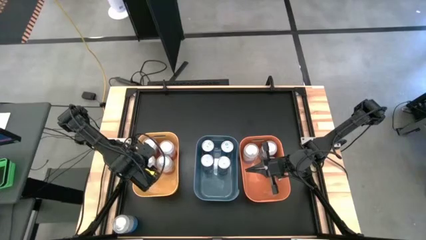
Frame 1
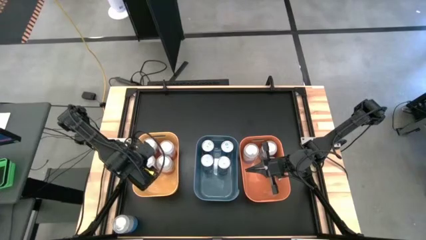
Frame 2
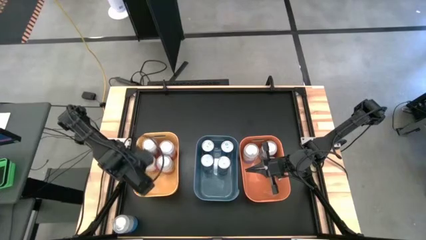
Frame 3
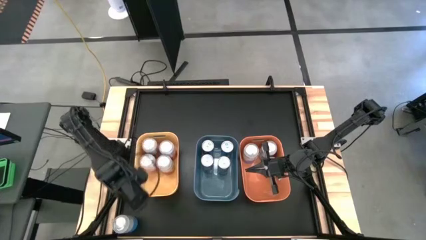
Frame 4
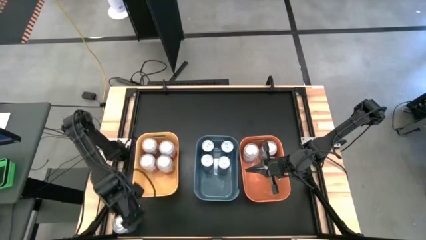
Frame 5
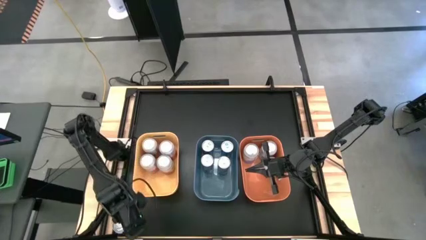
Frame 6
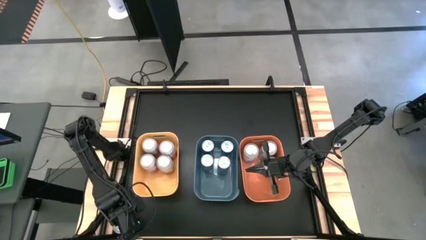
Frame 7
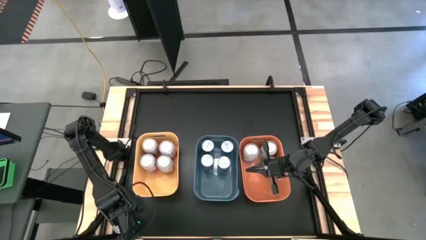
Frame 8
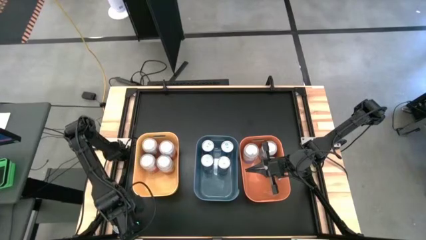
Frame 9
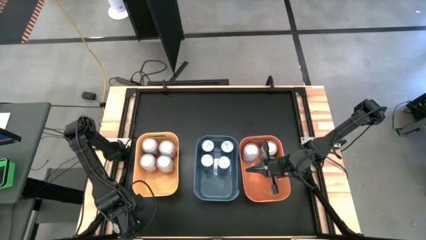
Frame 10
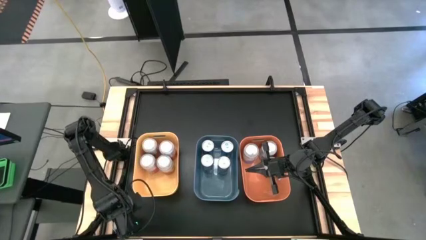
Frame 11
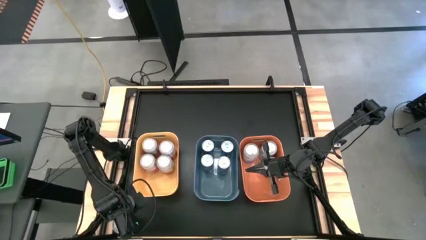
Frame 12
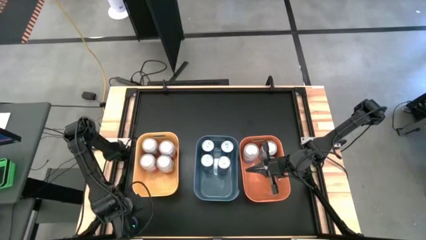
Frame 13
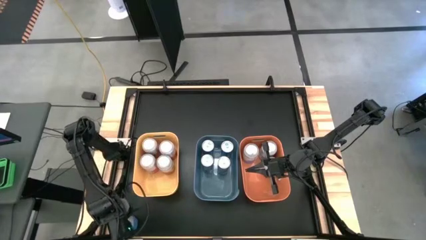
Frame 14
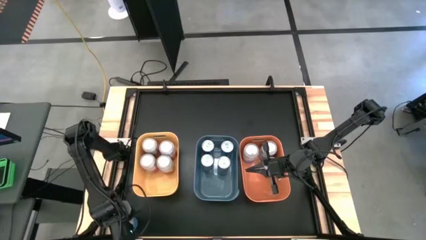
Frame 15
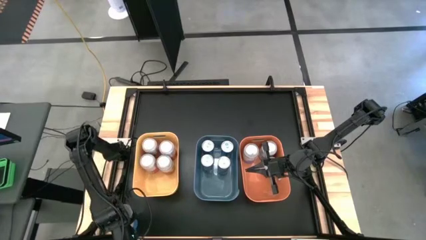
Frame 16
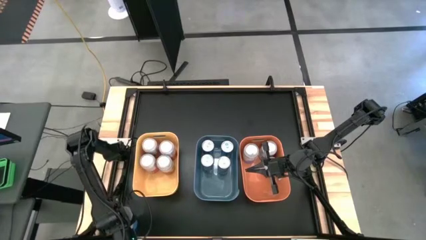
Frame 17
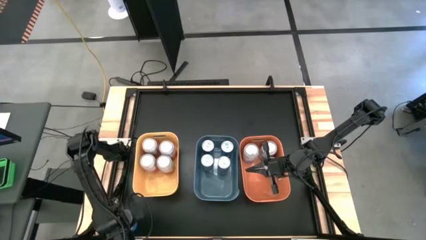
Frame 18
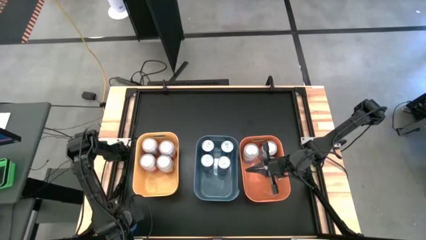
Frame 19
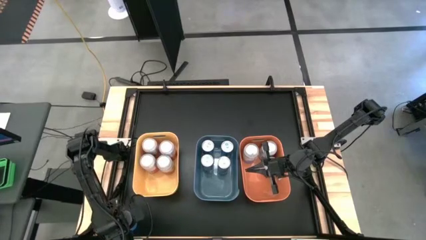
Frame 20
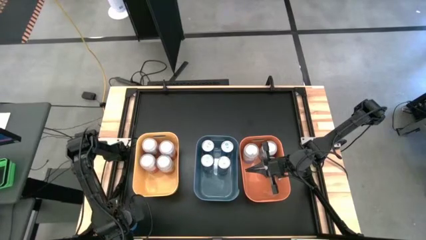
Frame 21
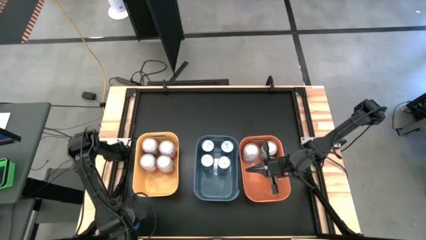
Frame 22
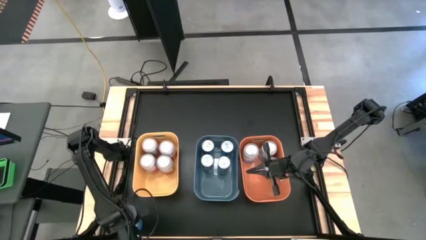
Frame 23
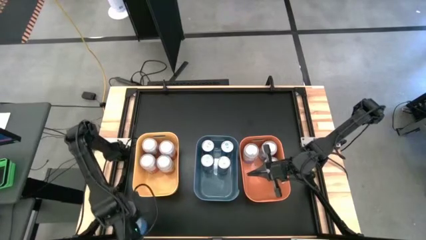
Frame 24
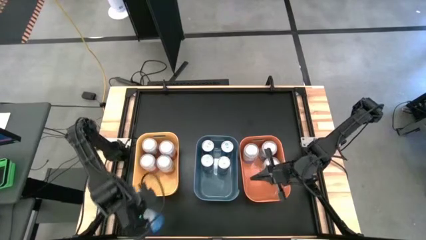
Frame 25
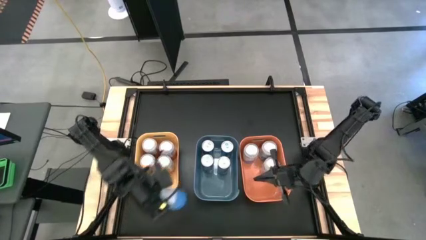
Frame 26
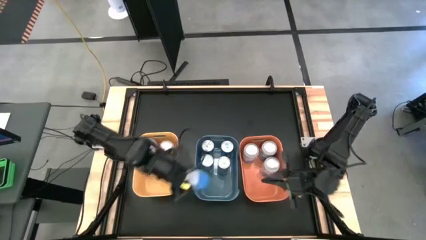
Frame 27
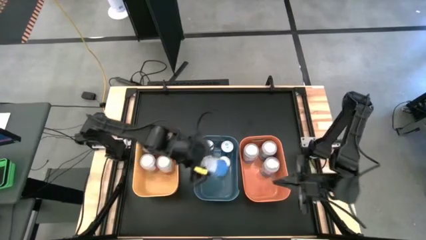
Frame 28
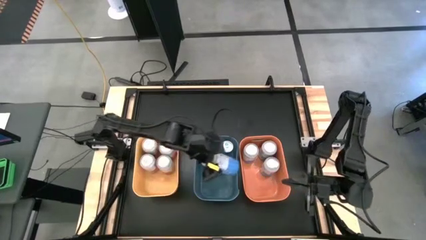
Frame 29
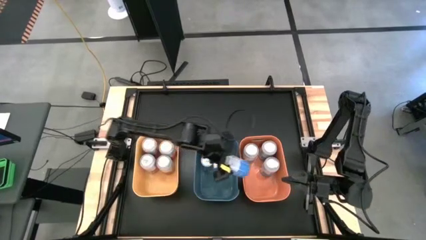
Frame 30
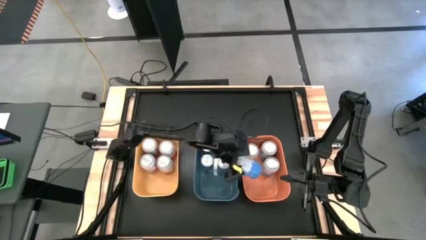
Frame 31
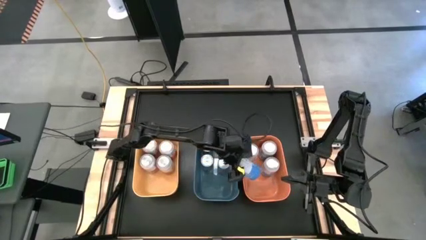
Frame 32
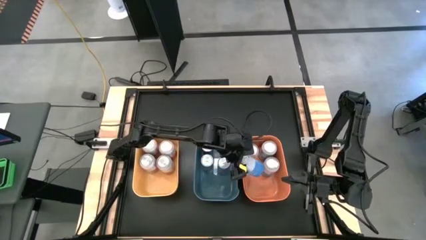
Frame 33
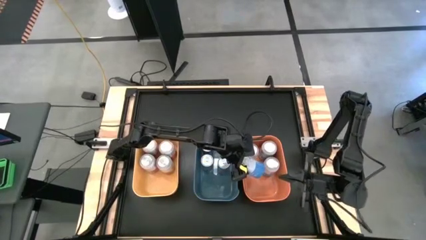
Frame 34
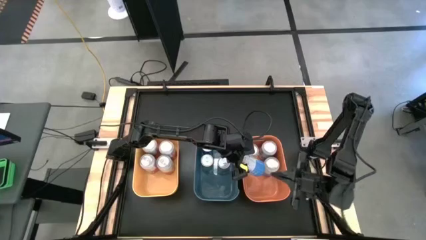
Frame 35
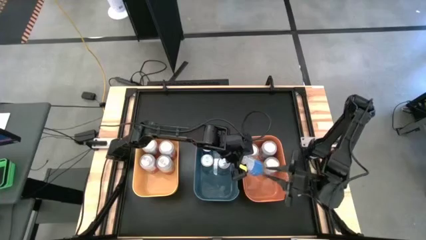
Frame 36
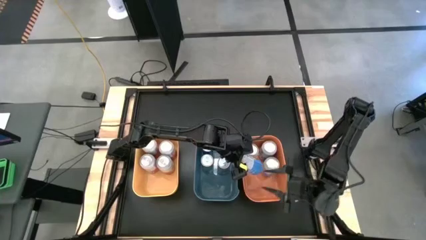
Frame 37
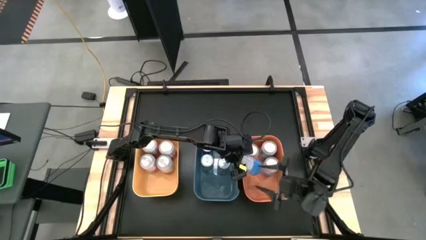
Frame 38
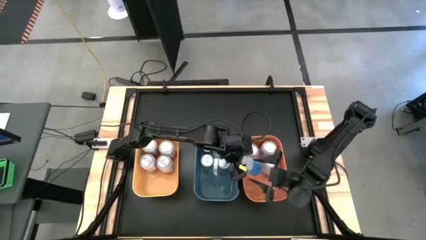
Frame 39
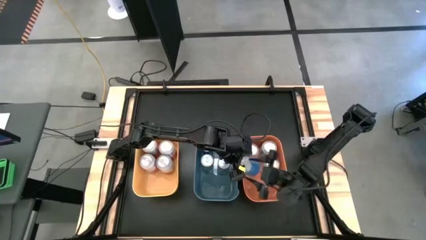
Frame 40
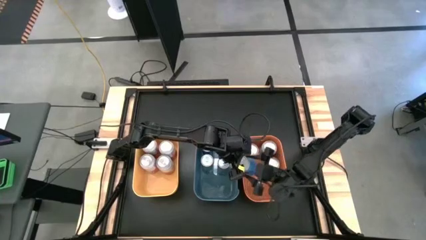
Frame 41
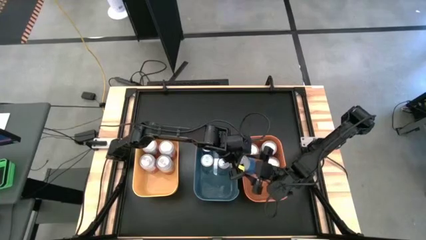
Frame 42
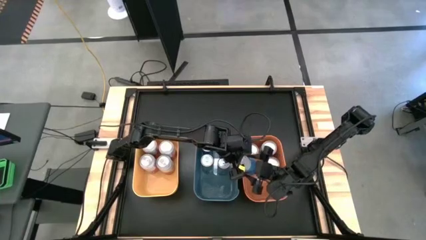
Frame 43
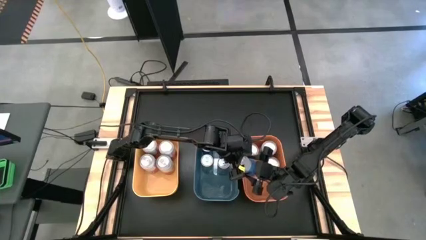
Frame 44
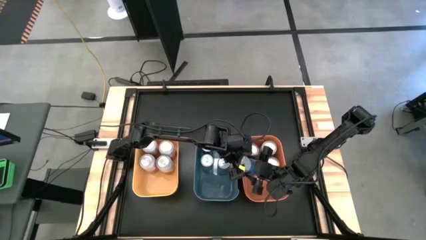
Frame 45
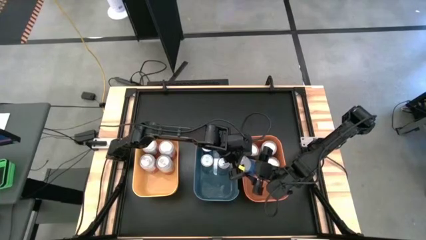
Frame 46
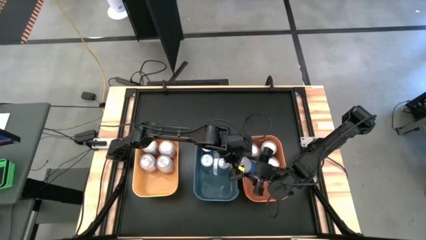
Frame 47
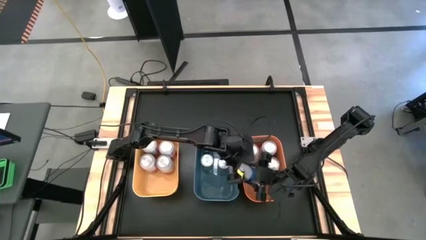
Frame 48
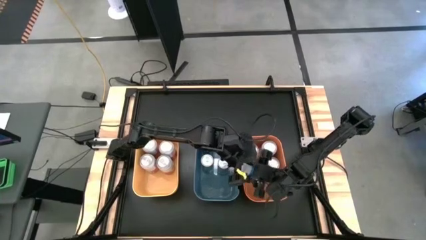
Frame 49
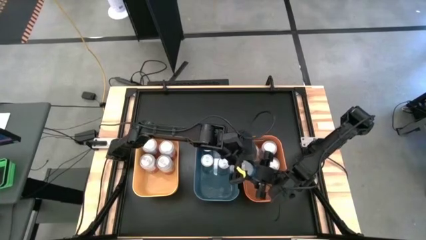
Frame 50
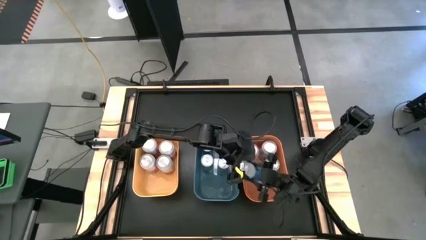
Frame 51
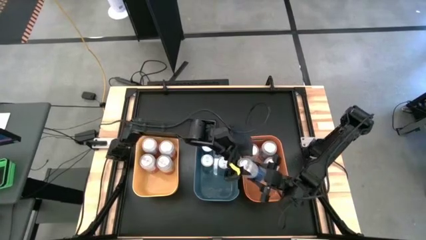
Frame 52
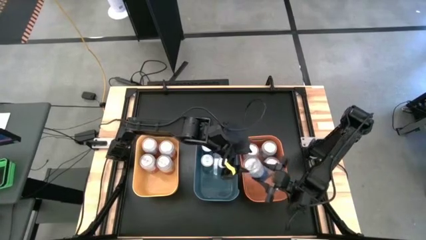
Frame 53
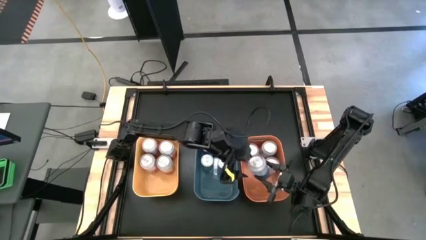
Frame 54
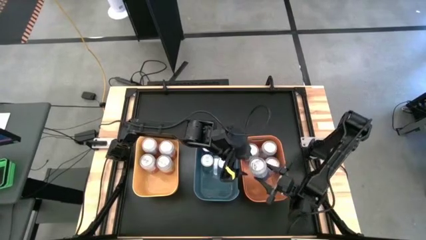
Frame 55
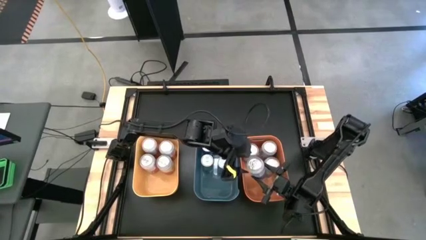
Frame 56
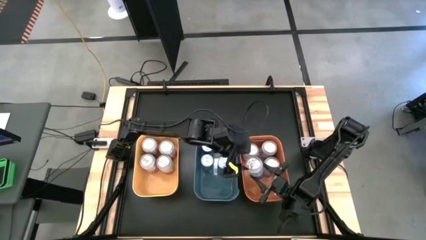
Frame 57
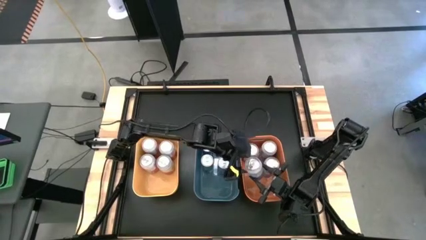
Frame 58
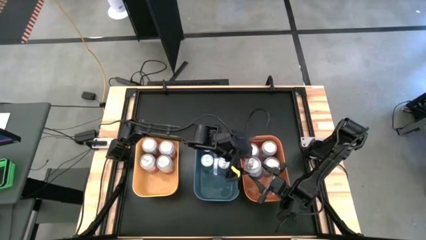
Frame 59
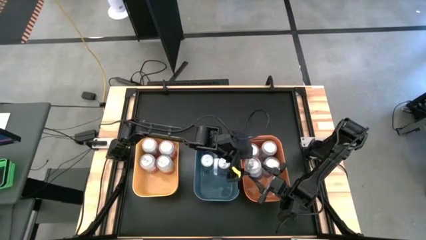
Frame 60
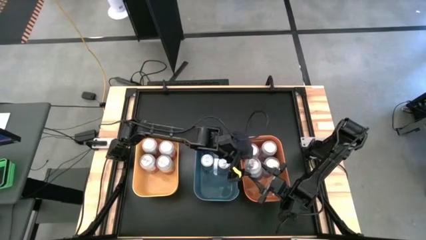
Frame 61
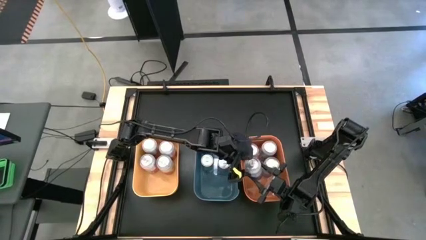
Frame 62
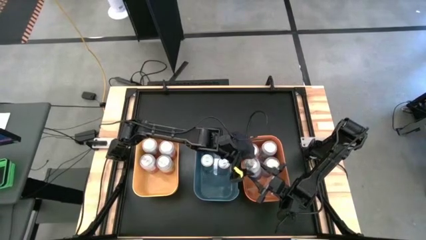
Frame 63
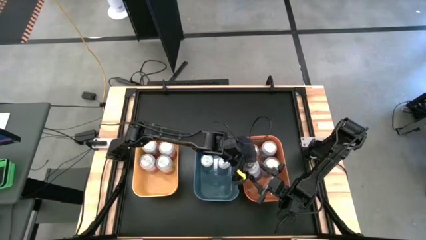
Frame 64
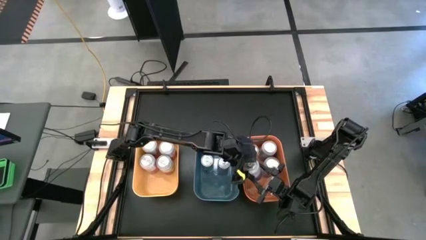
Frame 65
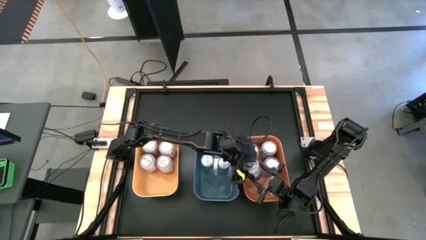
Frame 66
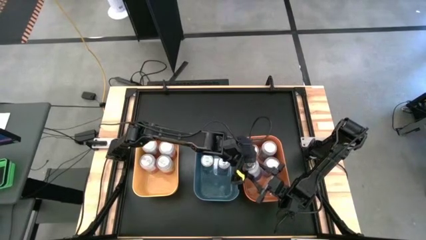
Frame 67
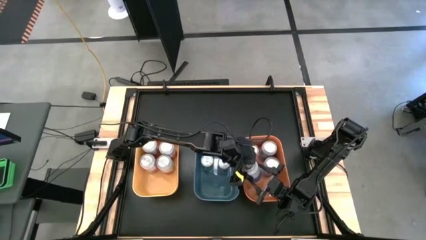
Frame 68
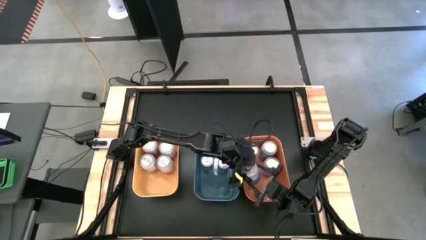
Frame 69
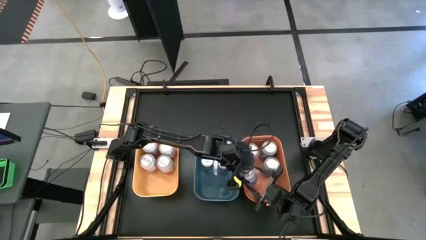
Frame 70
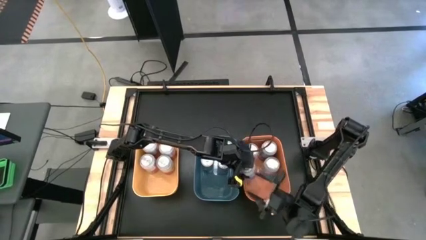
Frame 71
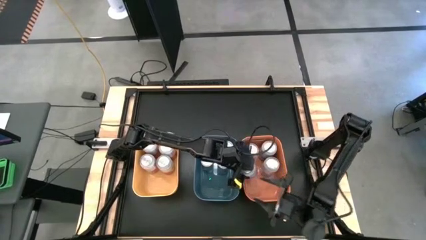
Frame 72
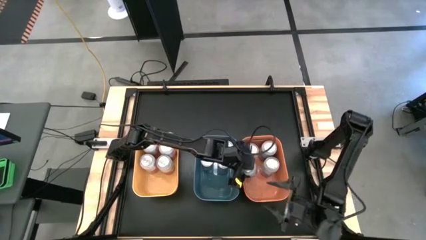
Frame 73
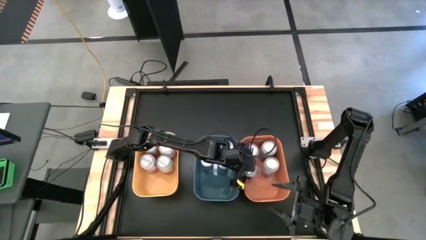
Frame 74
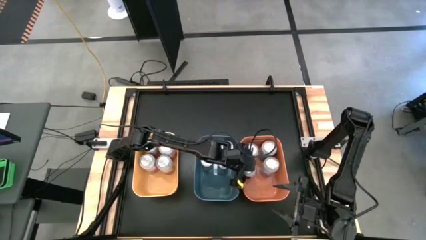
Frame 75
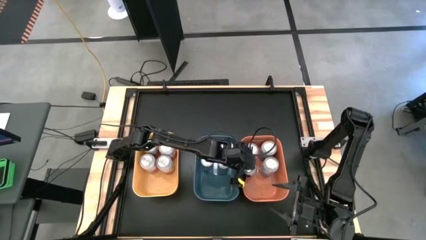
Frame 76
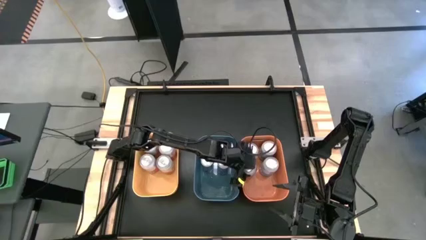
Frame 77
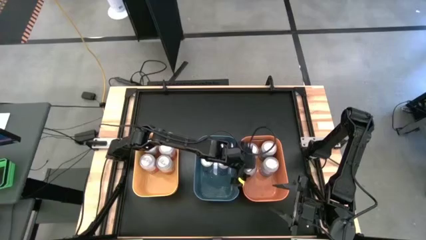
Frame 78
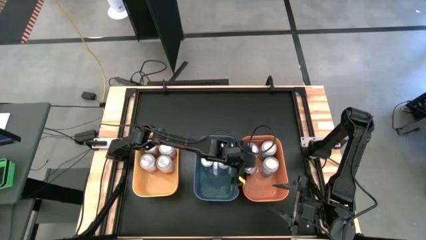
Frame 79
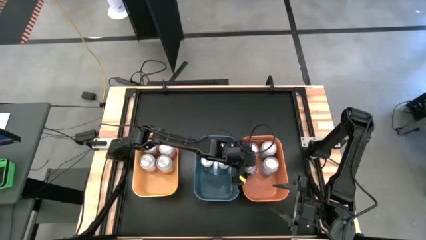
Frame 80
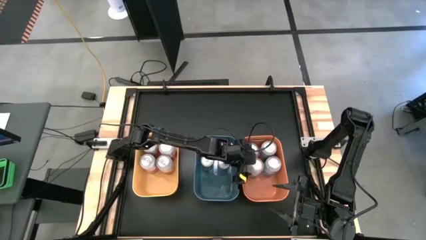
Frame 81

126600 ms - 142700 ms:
Task: Sort soda cans
Put the blue-white soda can into the orange bin
